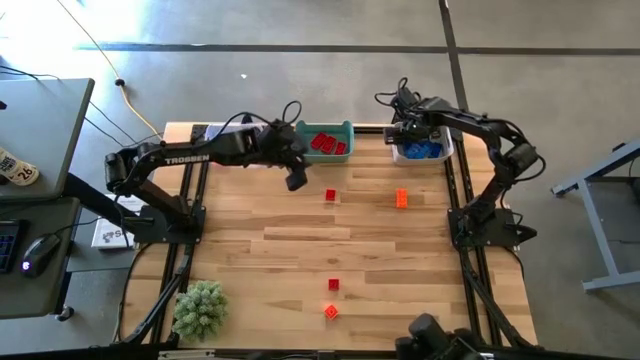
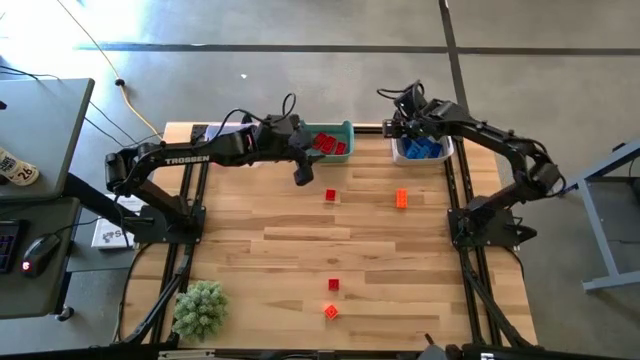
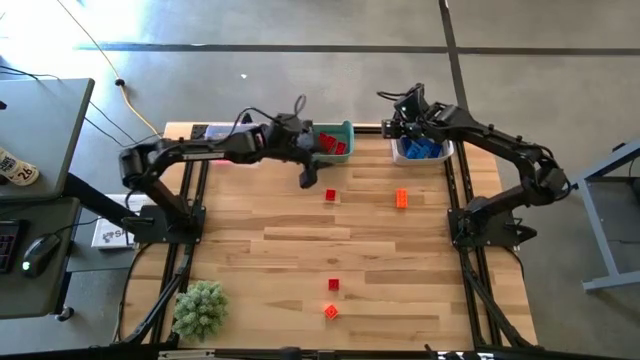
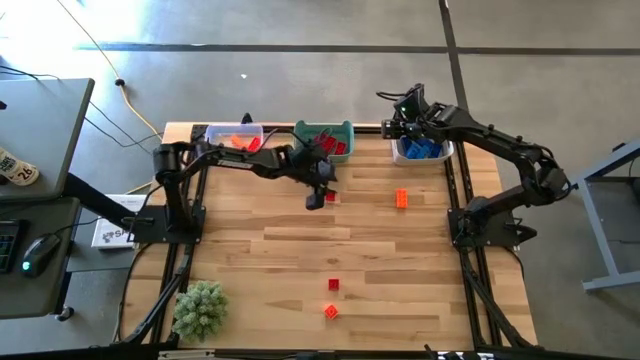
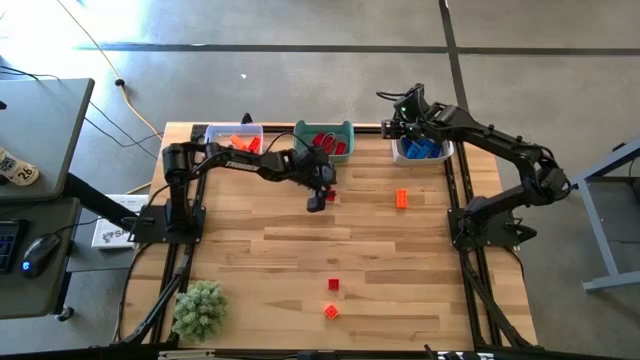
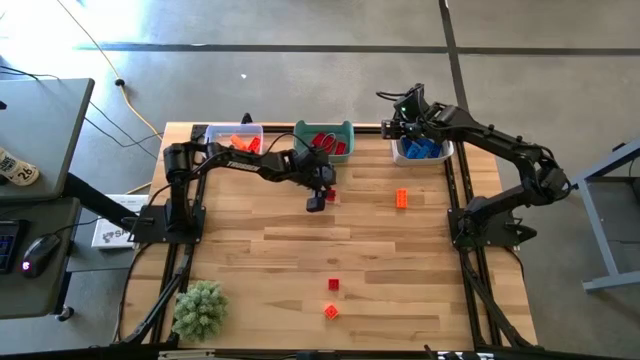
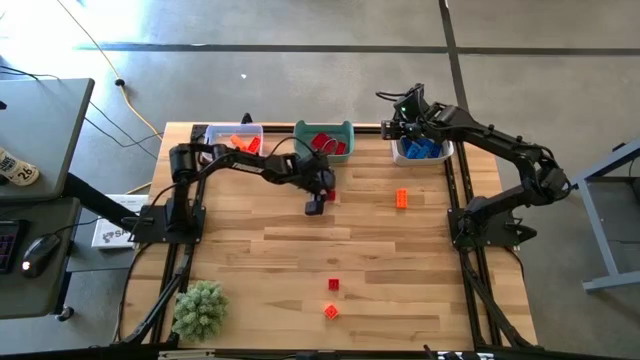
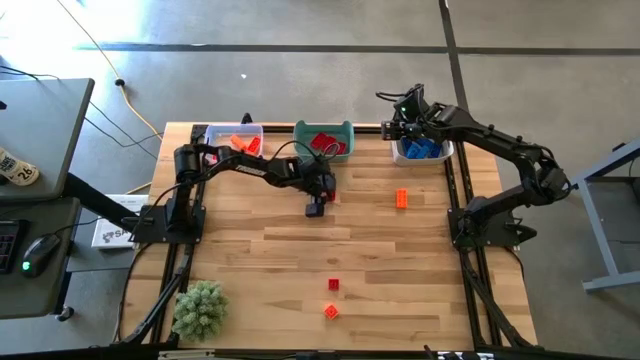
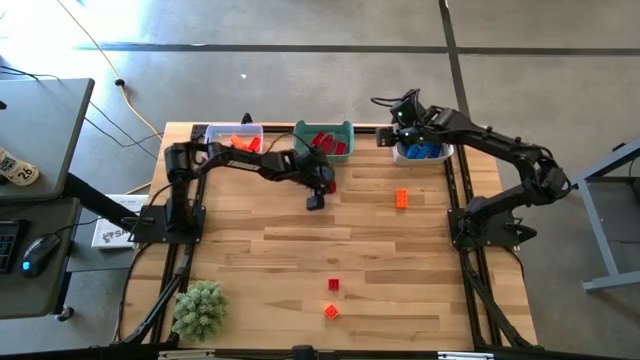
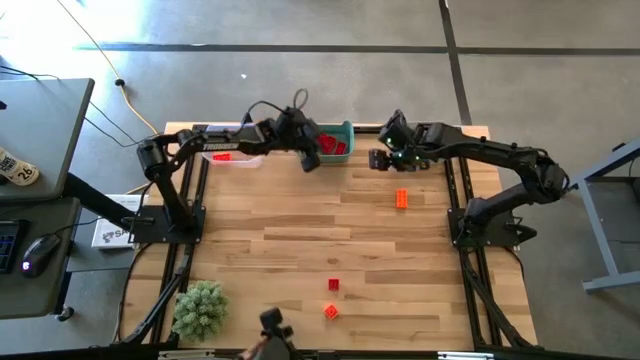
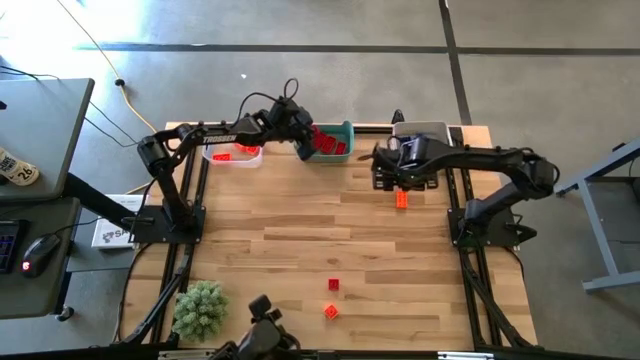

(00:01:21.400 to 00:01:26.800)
Task: Sort & place blocks by color
Put the red game piece into the green bin

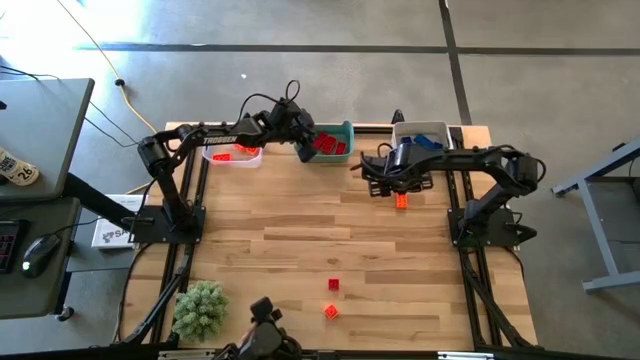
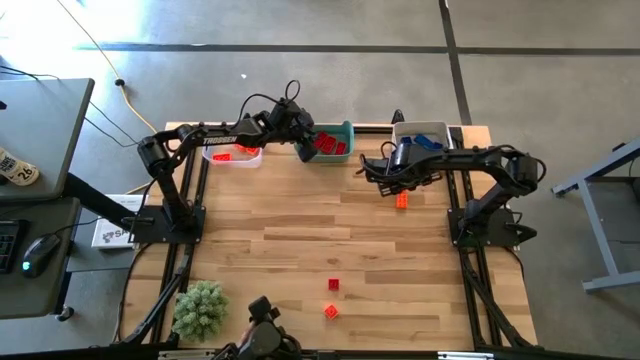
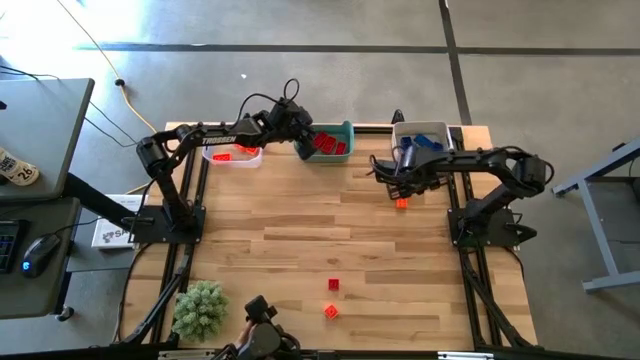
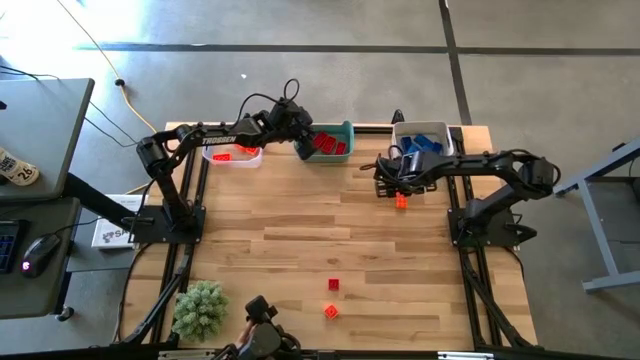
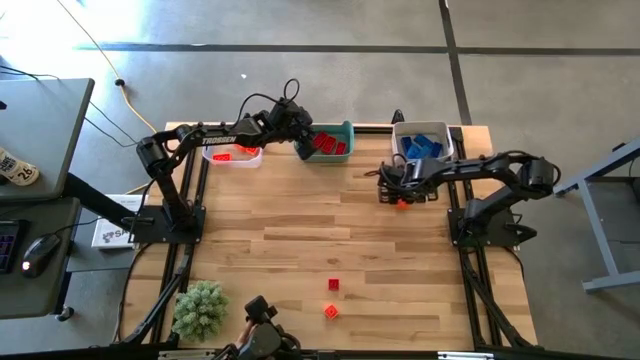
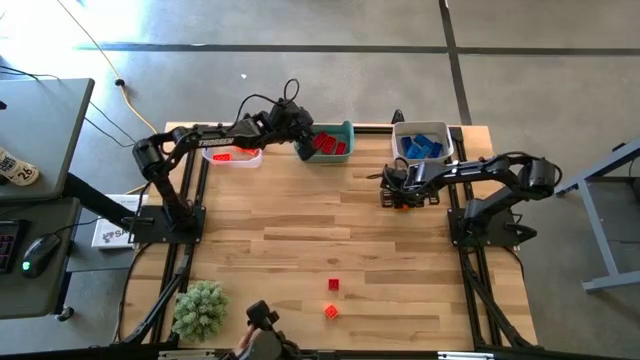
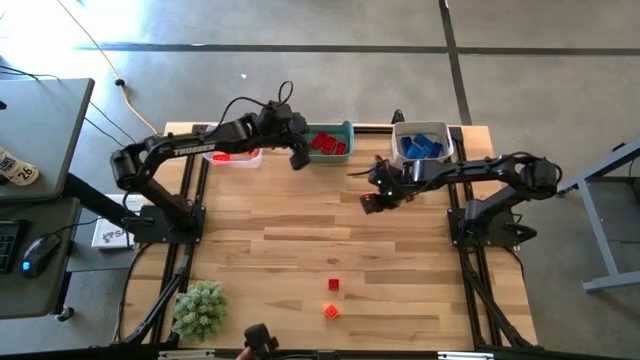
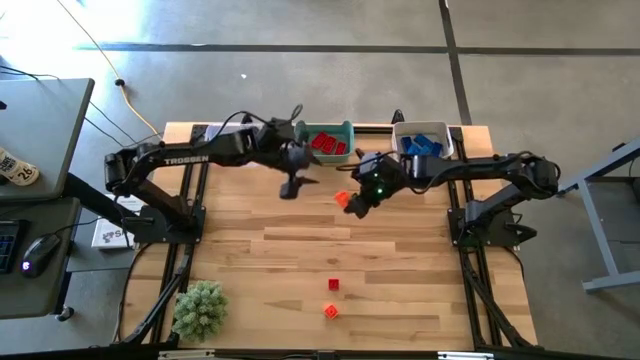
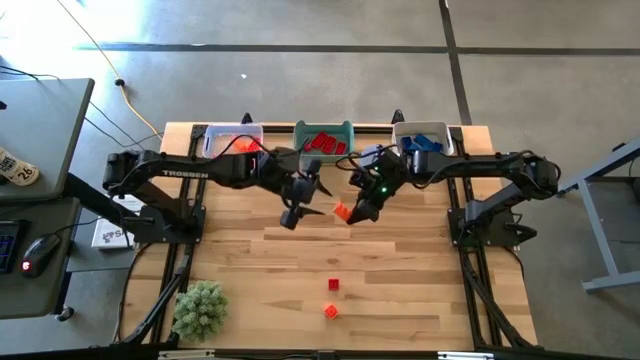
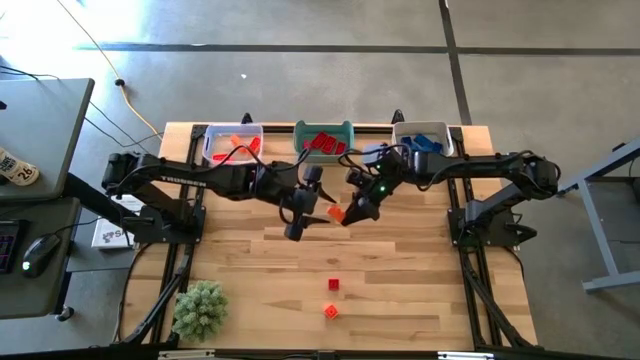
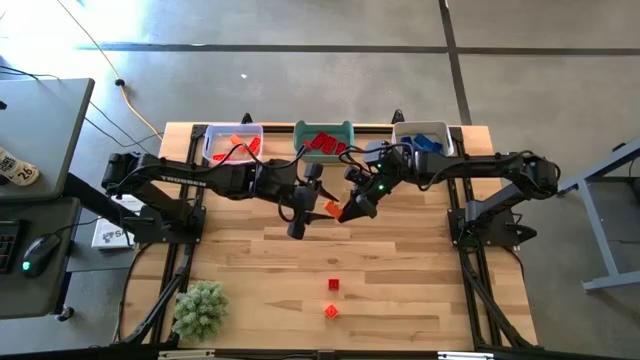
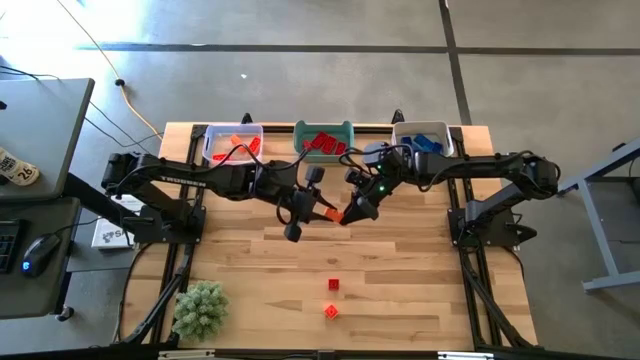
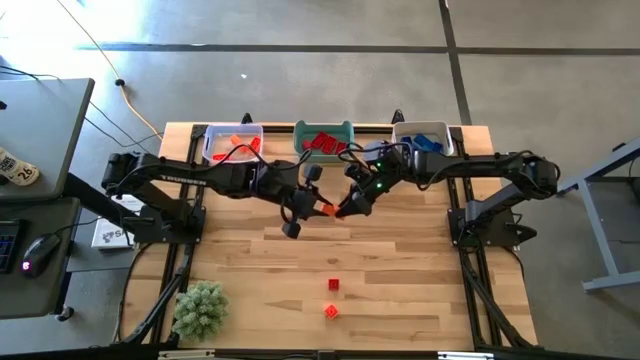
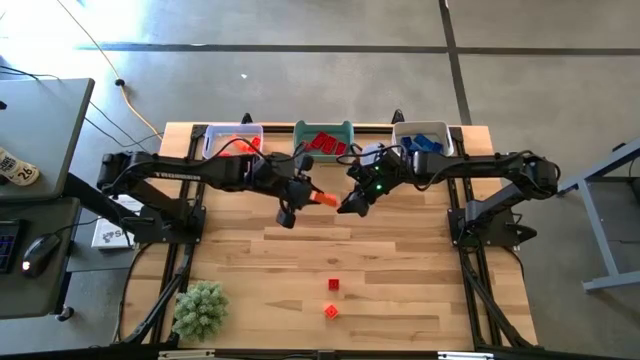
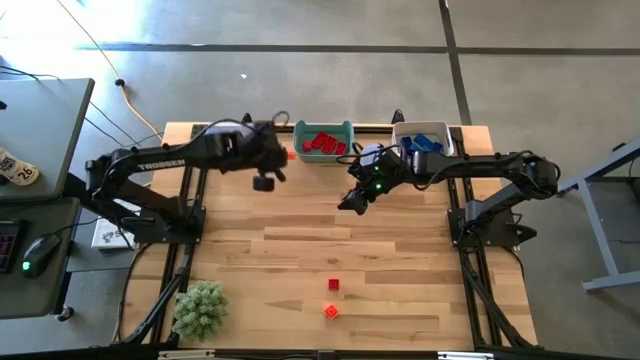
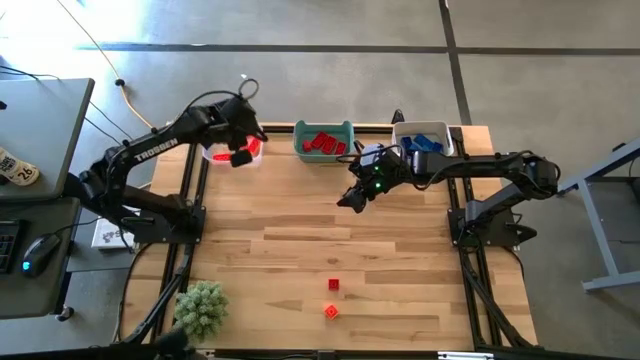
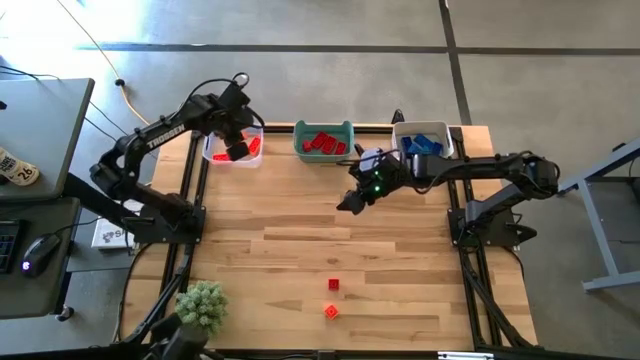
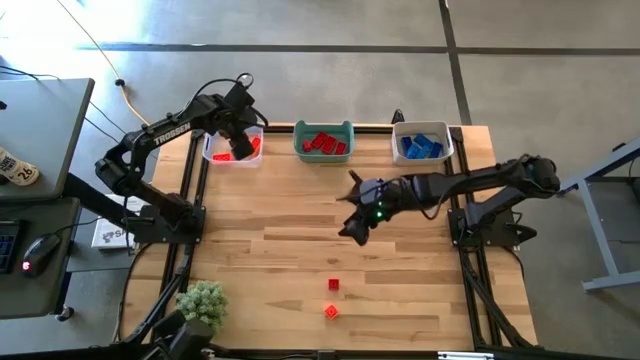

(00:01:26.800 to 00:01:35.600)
Put the orange game piece into the transparent bin

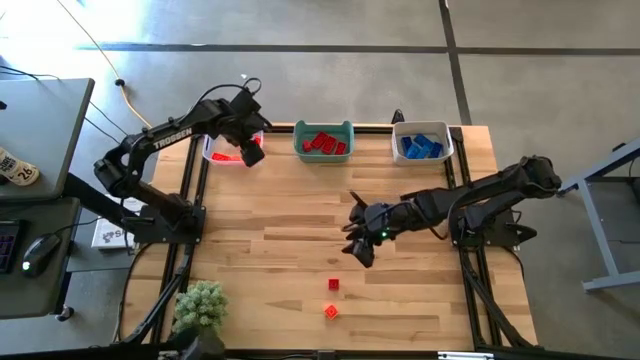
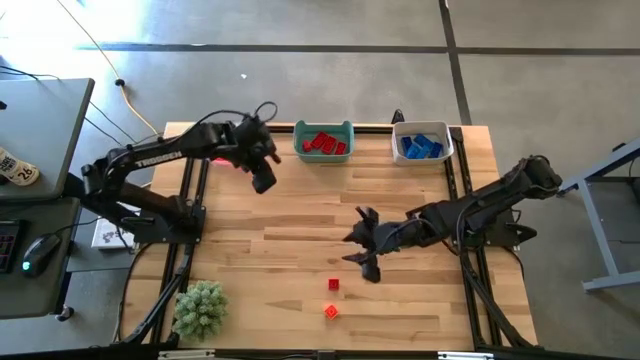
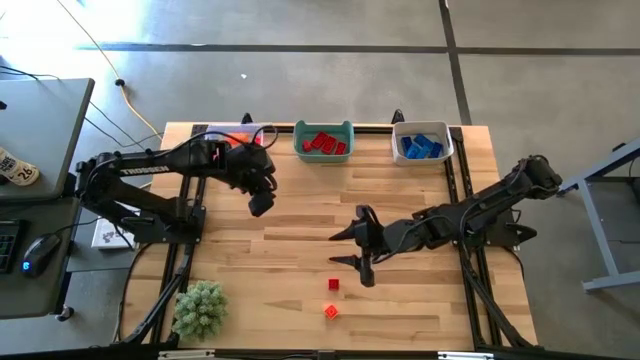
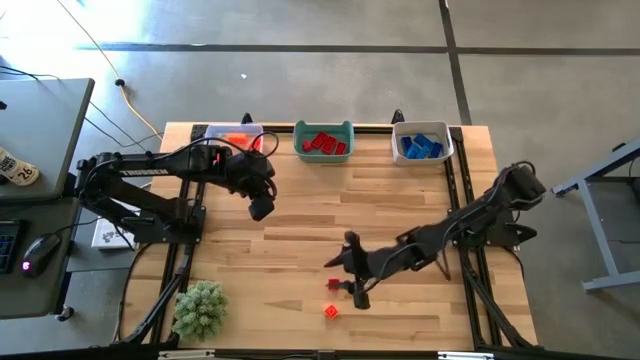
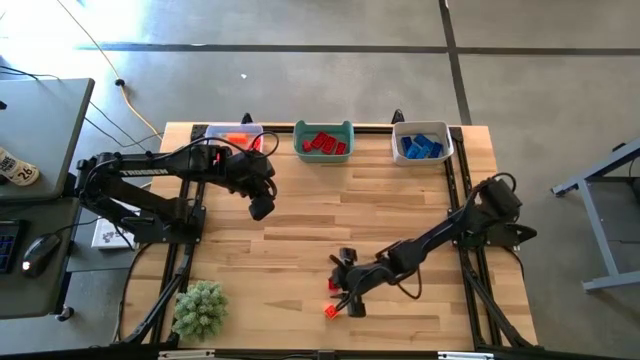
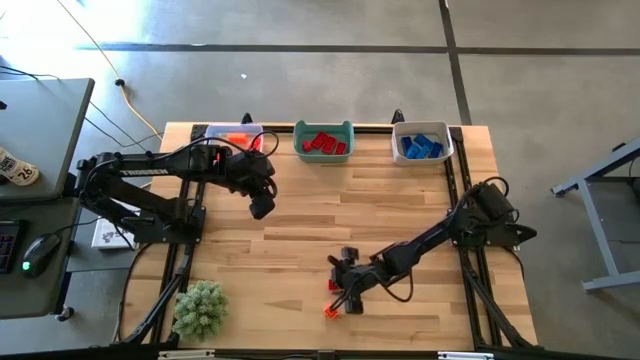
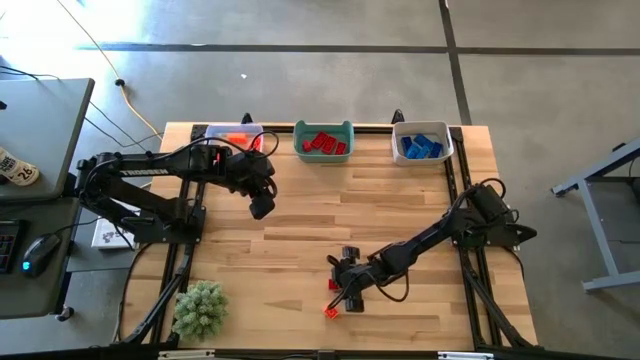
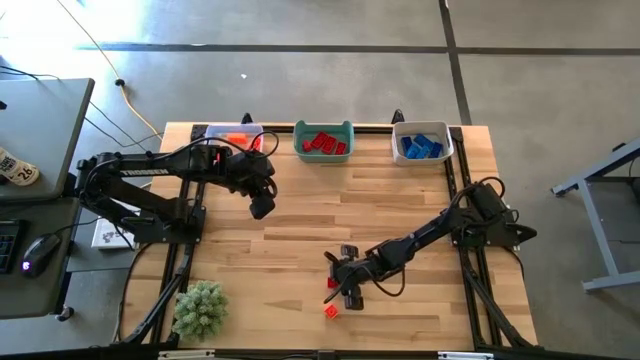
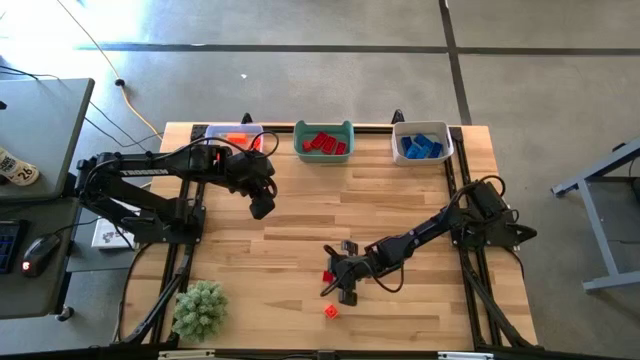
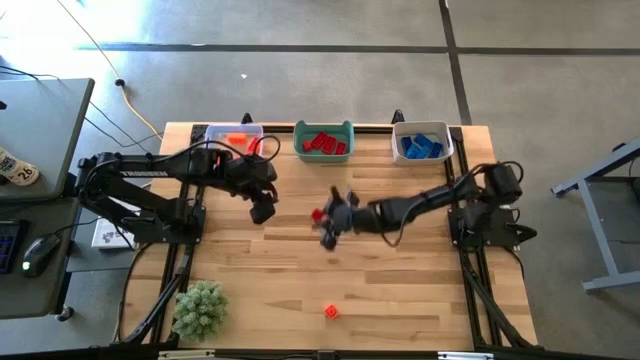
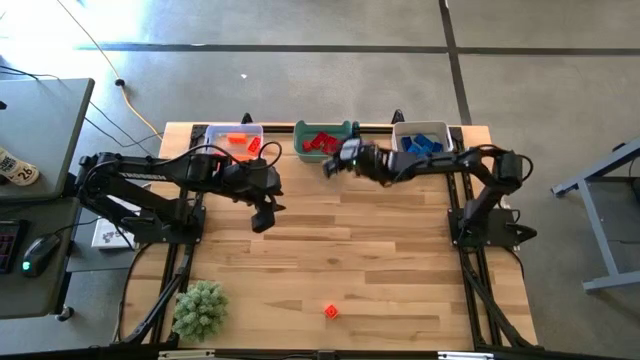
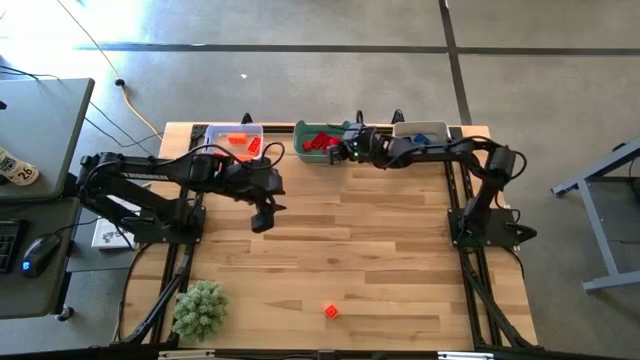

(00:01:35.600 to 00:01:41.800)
Put the red game piece into the green bin
